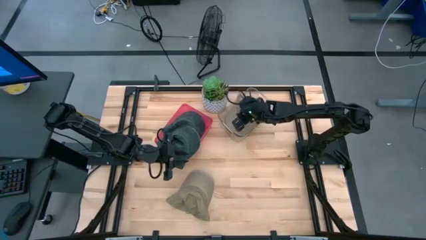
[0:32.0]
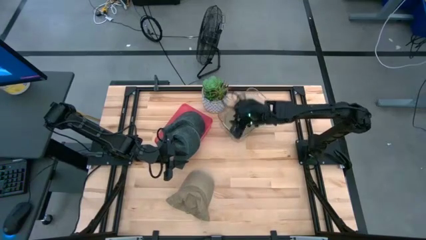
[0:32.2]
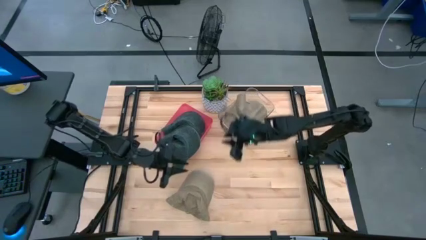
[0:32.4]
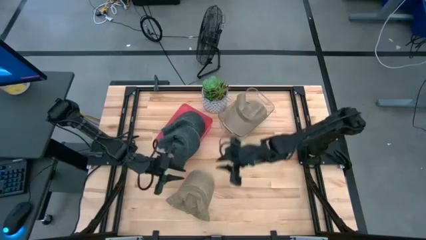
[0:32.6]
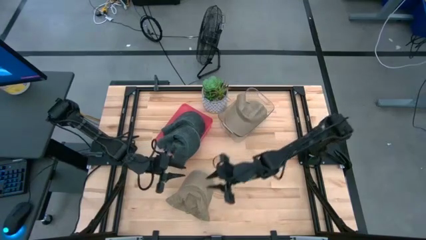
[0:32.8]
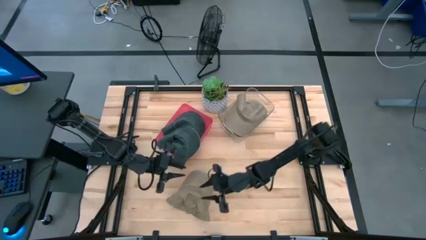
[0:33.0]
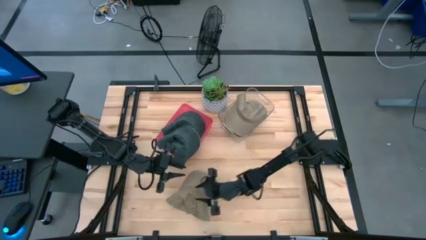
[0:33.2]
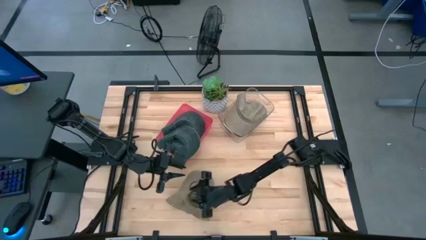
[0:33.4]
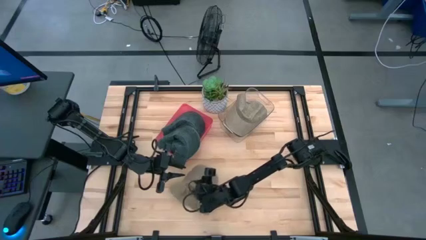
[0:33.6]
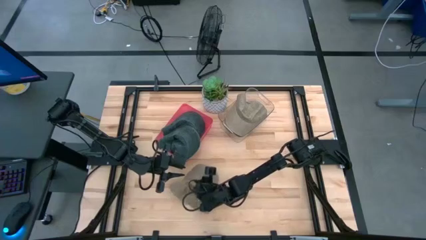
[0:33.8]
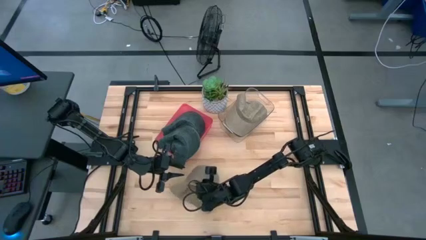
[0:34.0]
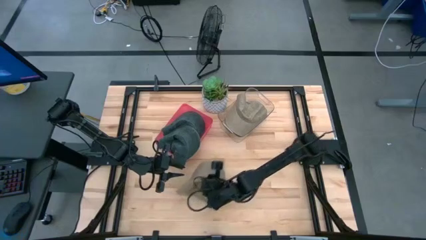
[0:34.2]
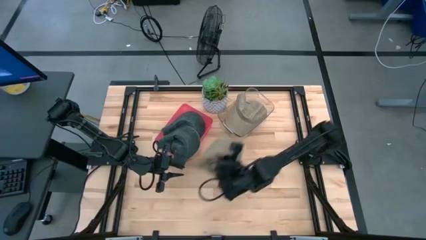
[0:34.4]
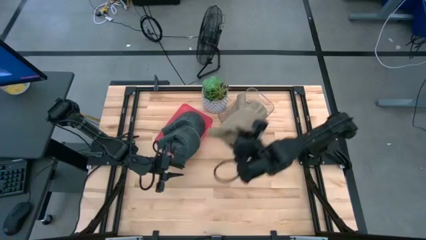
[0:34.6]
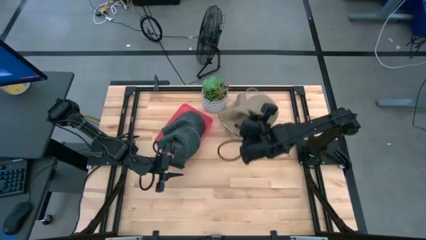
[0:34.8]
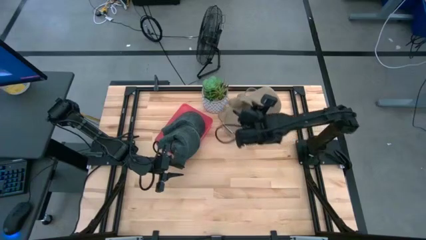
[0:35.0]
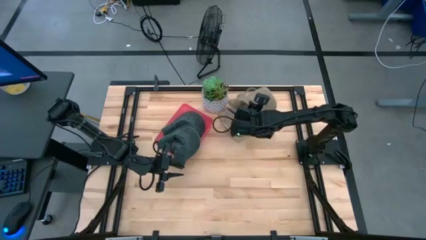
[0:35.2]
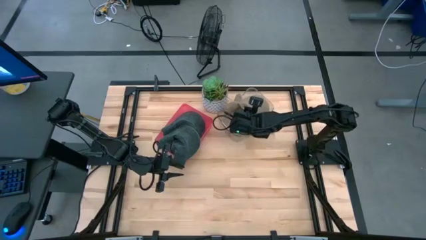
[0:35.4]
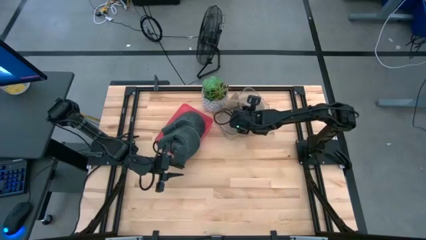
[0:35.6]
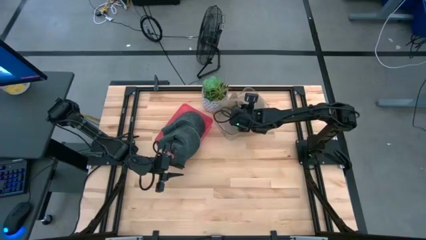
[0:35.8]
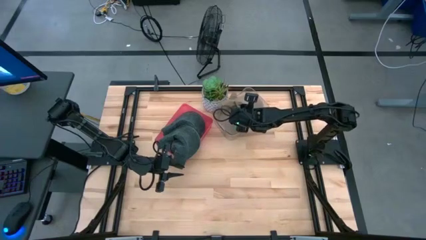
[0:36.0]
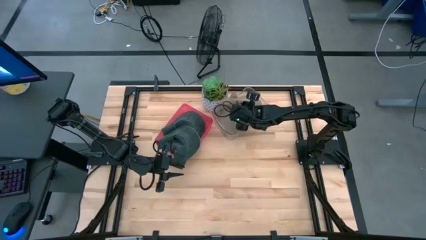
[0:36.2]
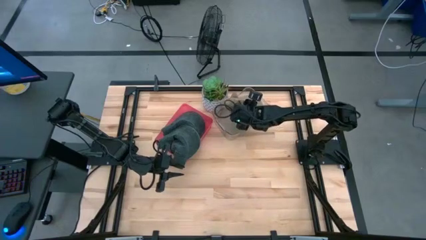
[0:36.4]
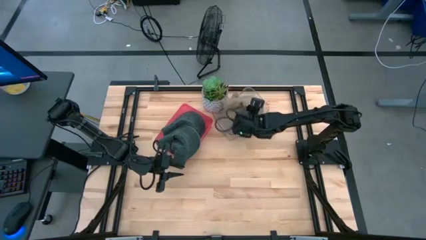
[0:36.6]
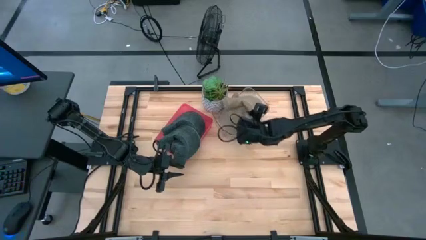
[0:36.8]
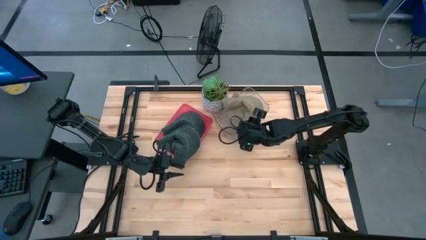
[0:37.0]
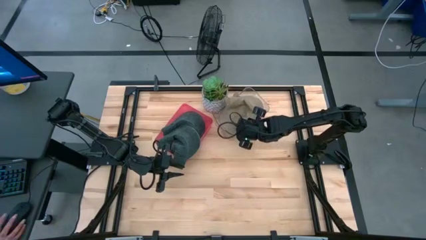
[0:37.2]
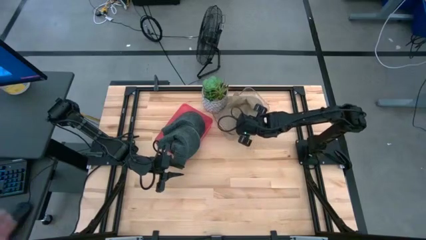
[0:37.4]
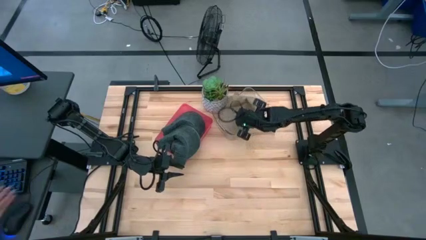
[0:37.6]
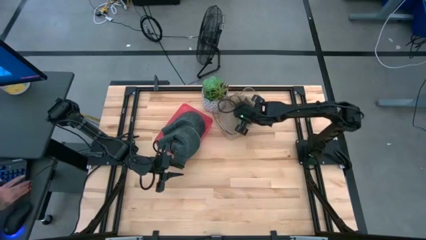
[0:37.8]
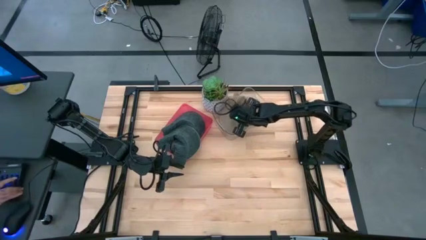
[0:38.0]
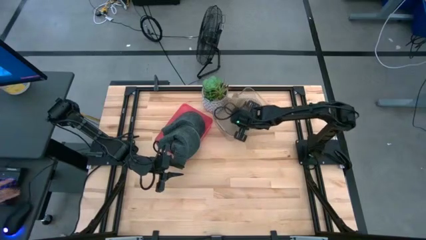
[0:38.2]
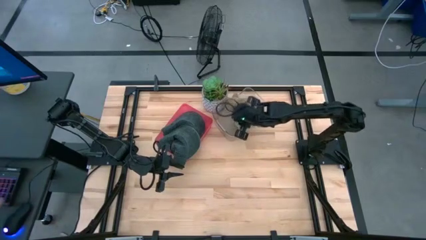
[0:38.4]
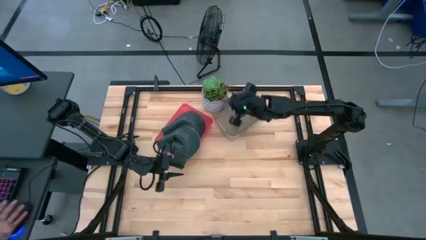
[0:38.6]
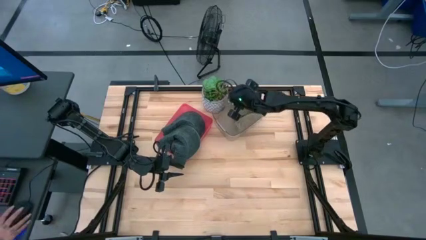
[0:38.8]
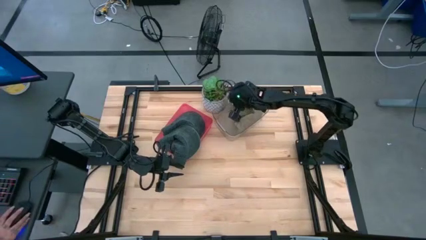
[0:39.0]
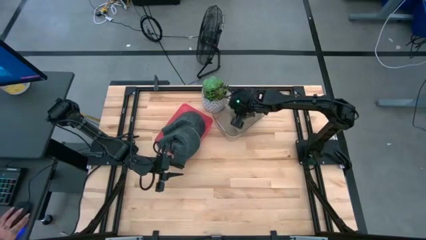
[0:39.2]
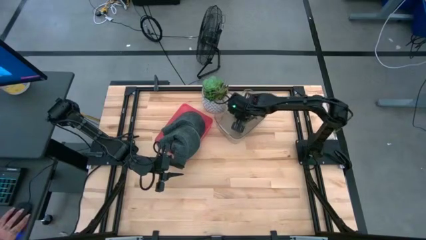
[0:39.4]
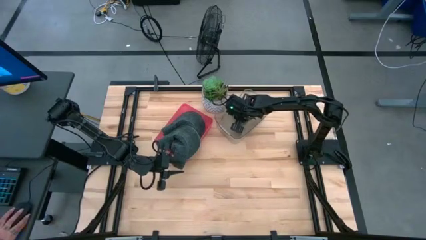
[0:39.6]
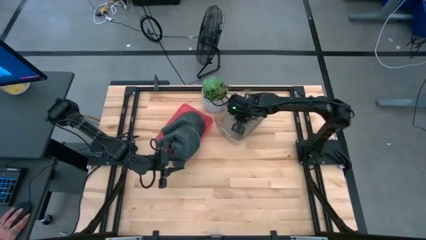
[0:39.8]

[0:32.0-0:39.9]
Task: Pick & Place hat
Put the brown cap into the transparent bin

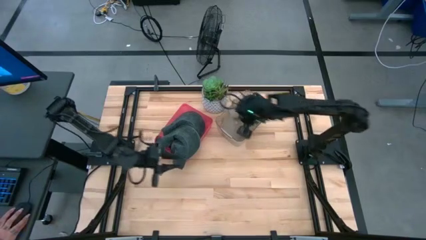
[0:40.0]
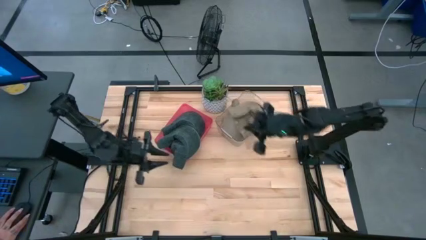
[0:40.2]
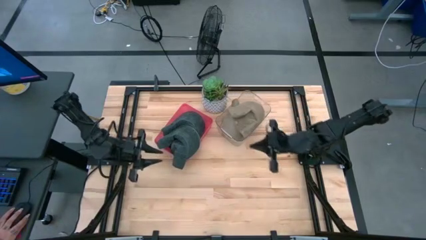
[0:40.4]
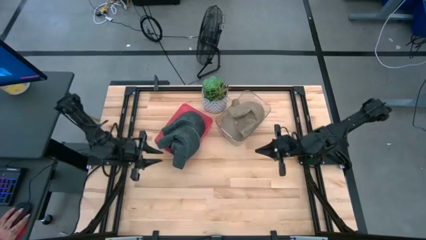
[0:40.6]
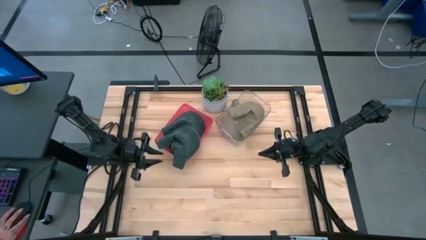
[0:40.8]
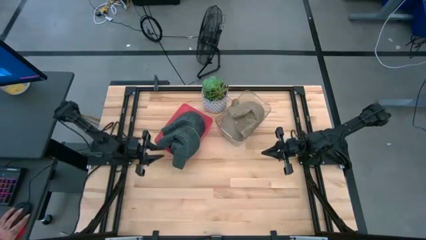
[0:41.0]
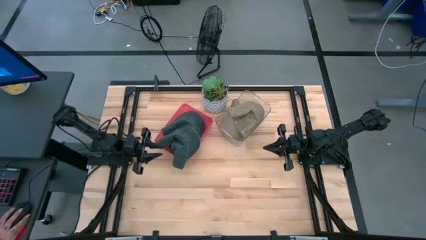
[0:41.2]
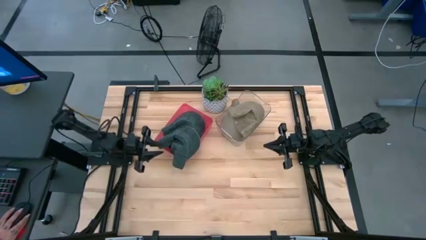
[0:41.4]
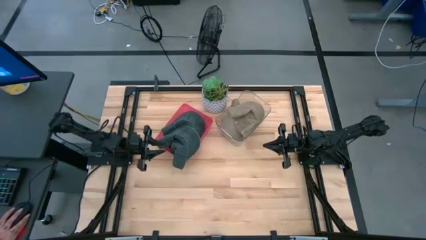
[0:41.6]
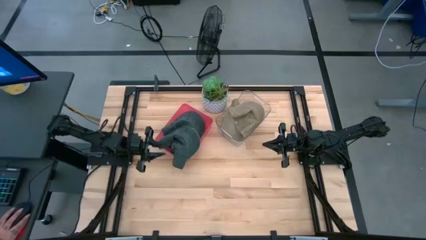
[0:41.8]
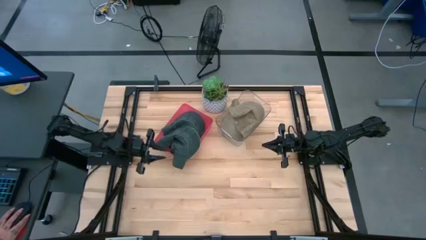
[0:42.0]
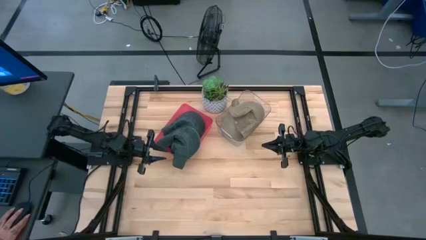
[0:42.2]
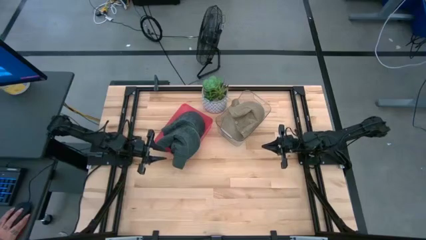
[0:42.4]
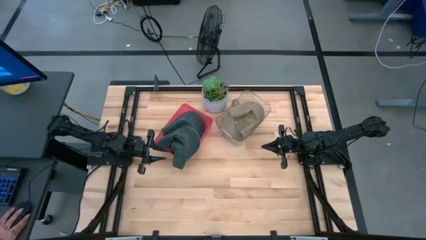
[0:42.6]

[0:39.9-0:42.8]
Return to Home Position

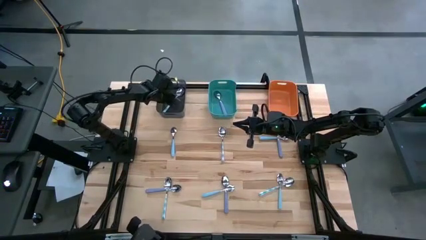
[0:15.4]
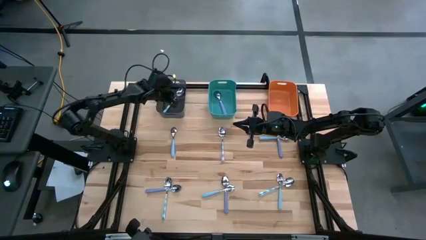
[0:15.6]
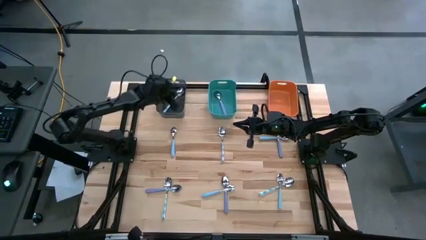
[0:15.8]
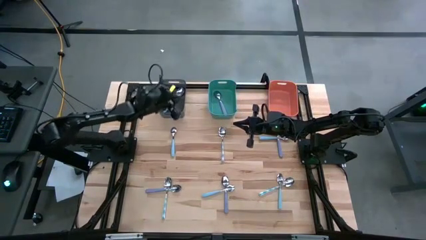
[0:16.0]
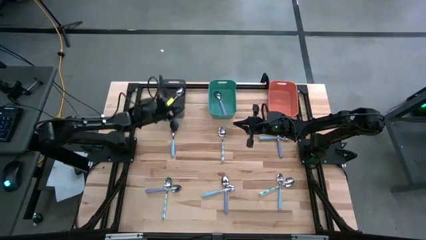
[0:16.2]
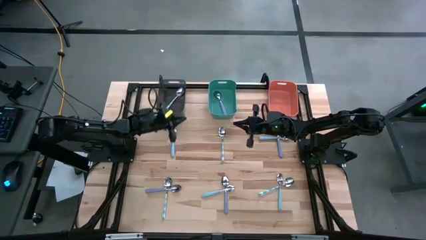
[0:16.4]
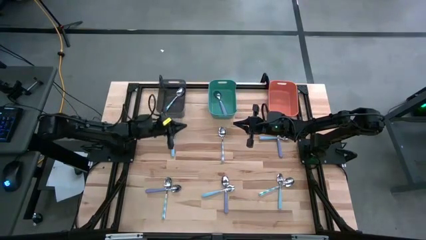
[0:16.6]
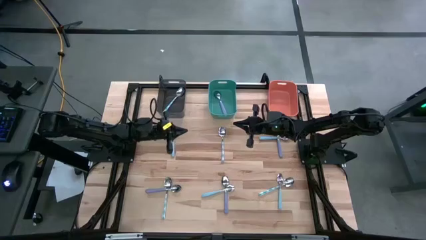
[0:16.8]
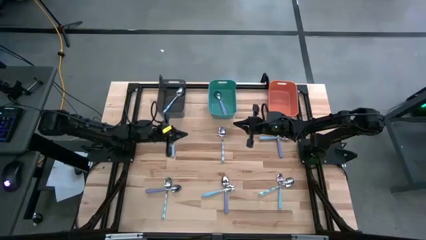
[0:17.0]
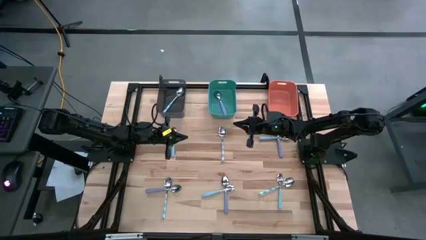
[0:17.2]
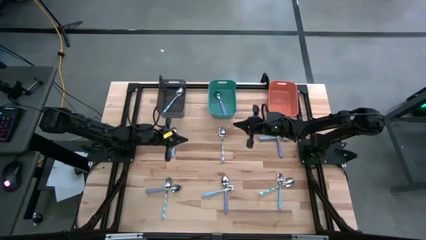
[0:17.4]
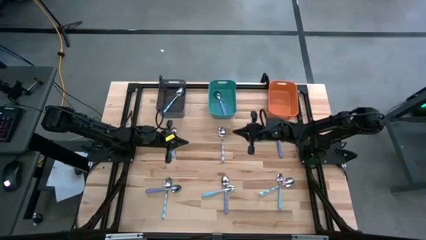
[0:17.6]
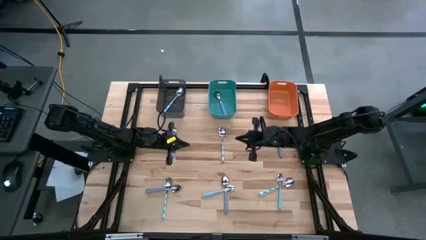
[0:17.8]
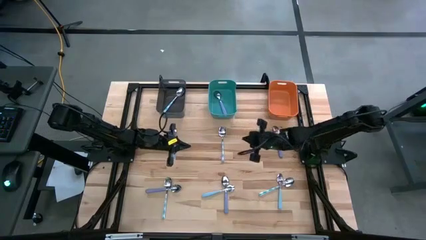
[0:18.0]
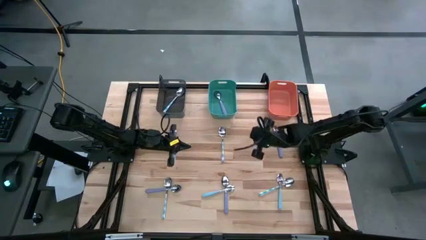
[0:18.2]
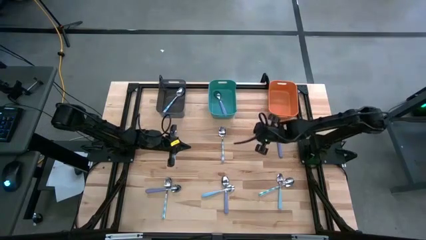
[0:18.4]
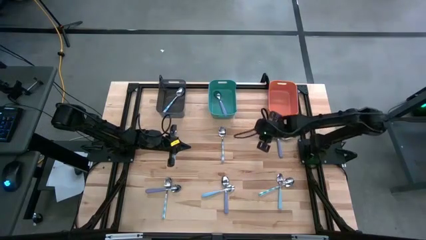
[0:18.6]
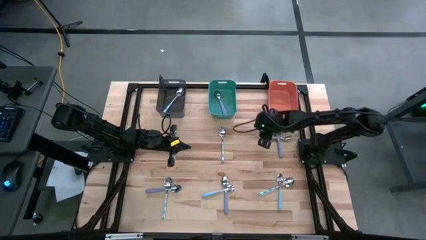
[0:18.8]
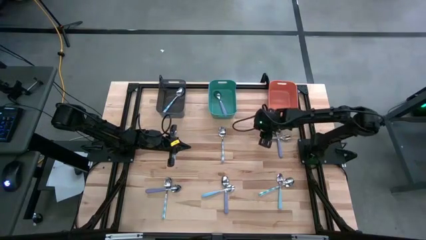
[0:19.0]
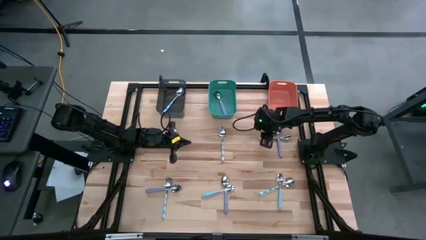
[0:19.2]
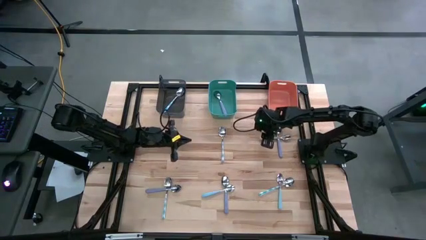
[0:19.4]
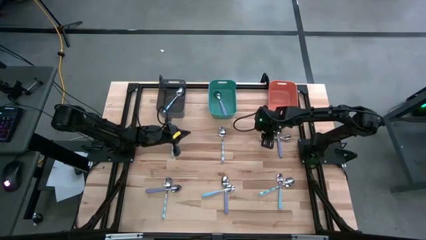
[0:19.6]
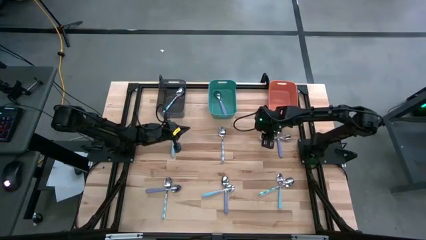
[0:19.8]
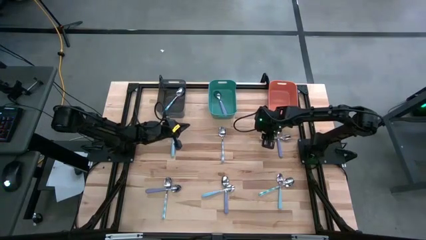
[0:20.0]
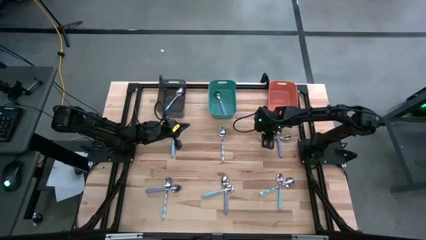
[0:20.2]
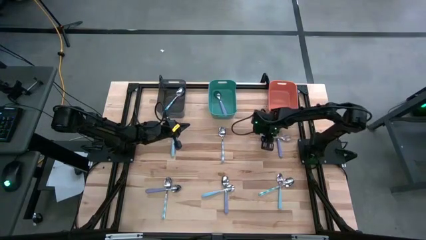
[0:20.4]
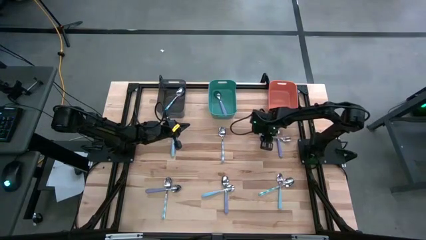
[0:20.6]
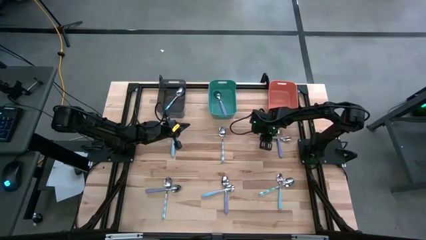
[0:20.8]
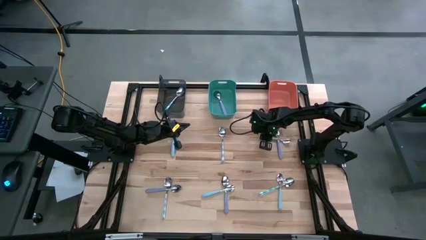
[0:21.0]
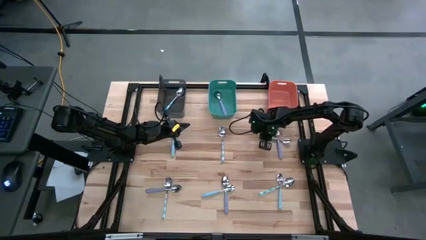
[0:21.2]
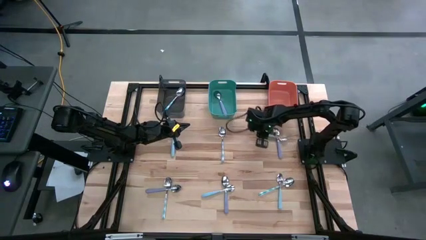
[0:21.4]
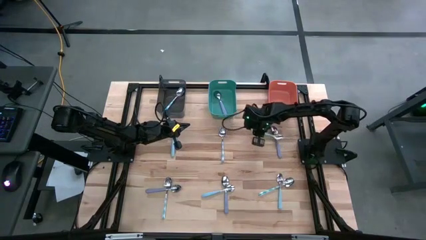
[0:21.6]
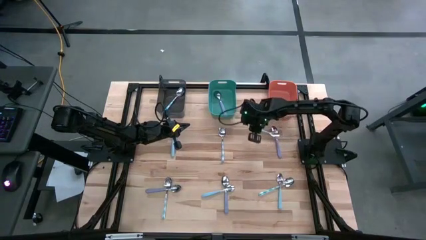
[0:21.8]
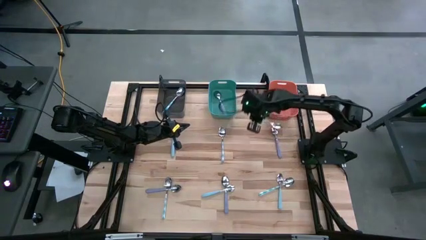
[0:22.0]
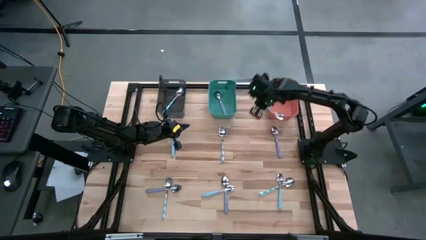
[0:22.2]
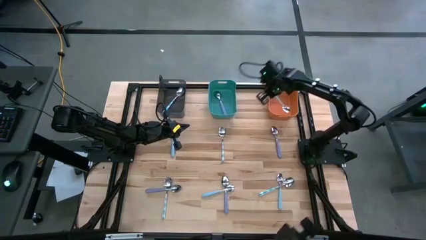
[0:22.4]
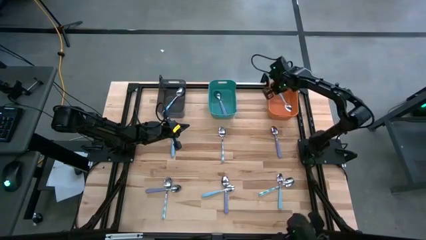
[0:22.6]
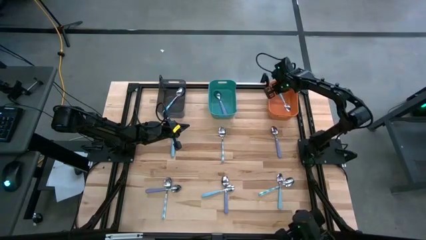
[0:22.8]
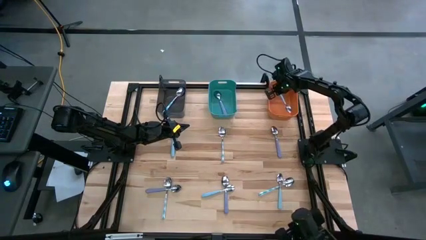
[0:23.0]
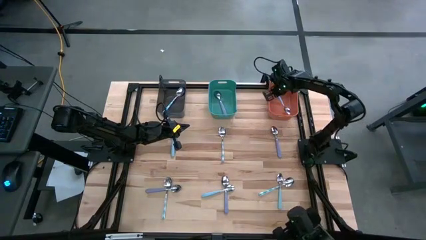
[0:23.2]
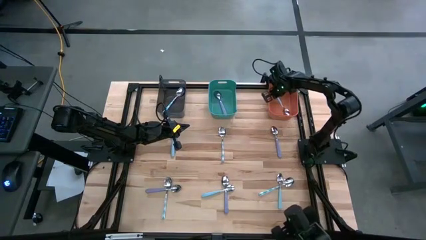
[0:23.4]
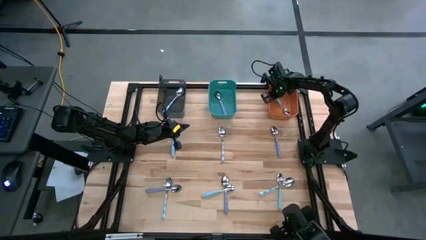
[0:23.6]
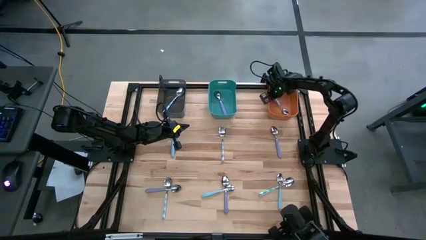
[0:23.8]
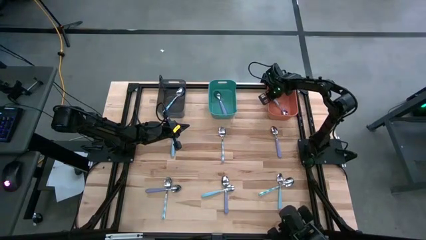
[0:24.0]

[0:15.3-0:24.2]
Task: Sort silverware by color (type)
Put the top right blue spoon into the orange bin
